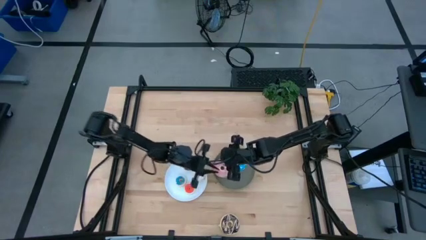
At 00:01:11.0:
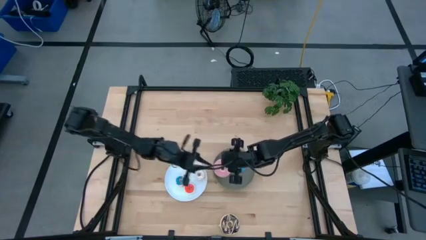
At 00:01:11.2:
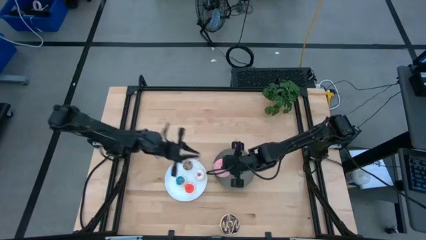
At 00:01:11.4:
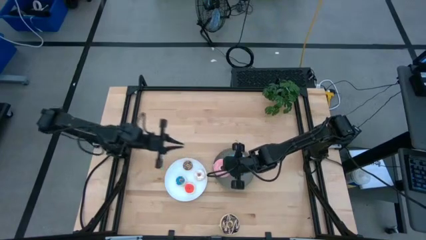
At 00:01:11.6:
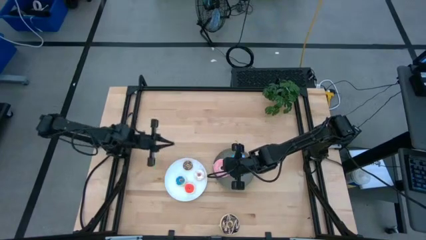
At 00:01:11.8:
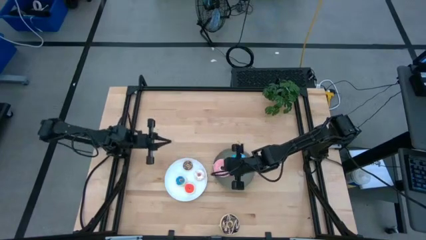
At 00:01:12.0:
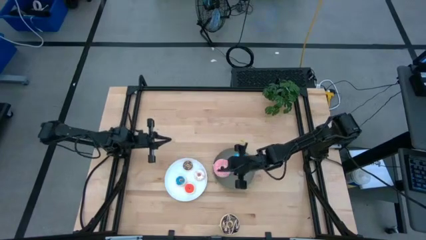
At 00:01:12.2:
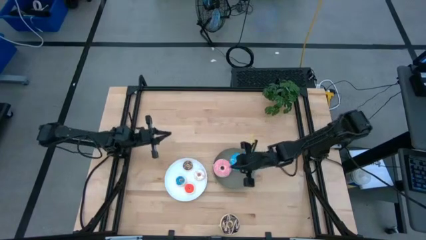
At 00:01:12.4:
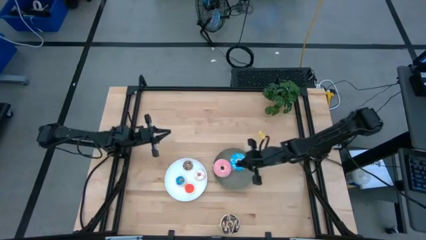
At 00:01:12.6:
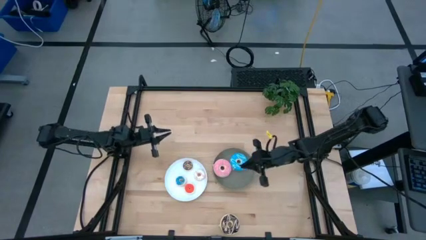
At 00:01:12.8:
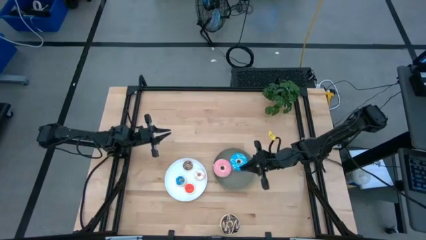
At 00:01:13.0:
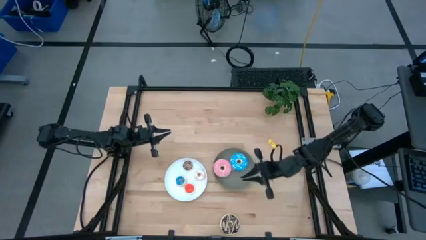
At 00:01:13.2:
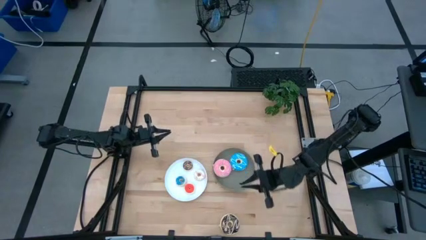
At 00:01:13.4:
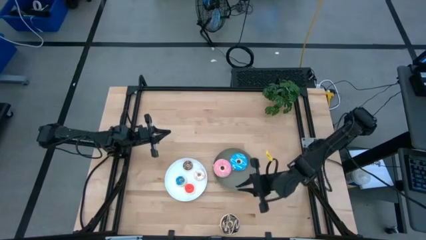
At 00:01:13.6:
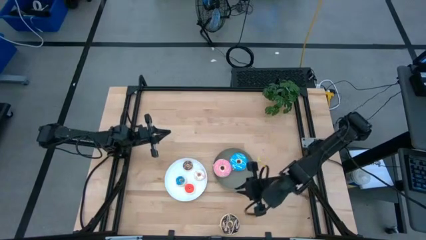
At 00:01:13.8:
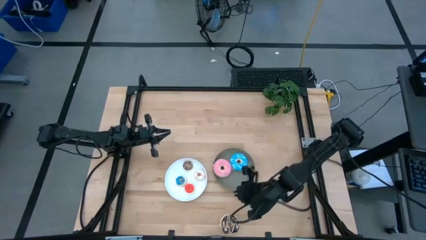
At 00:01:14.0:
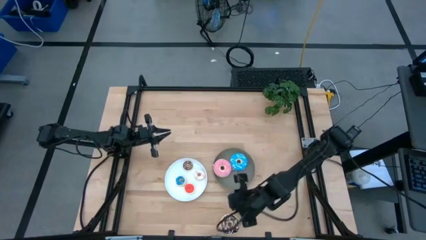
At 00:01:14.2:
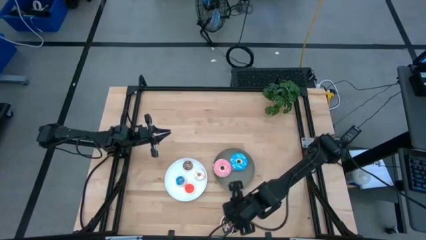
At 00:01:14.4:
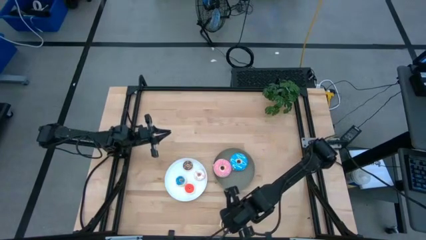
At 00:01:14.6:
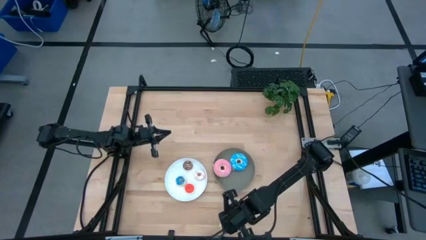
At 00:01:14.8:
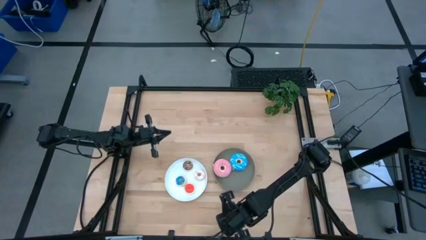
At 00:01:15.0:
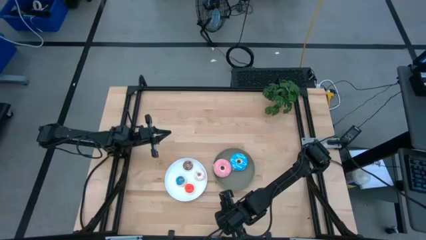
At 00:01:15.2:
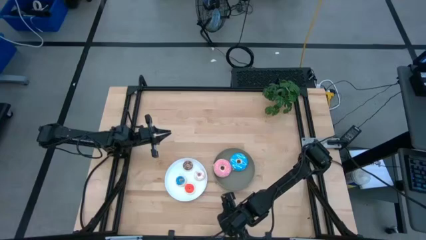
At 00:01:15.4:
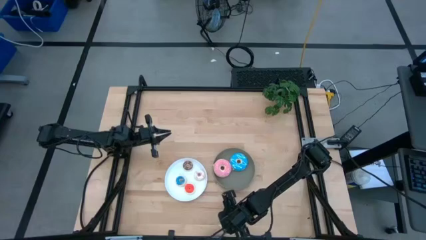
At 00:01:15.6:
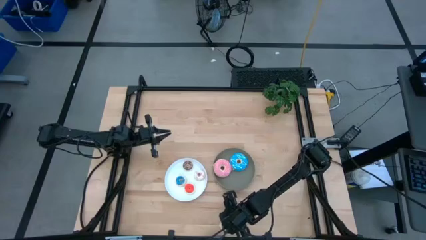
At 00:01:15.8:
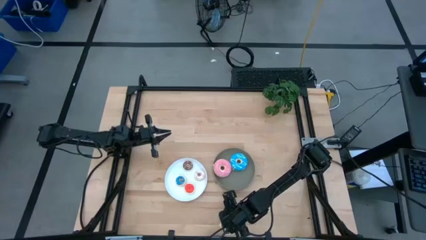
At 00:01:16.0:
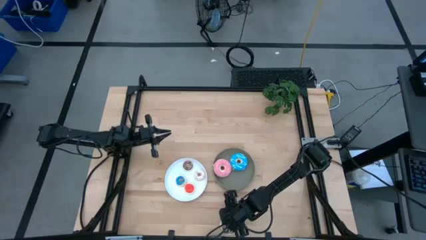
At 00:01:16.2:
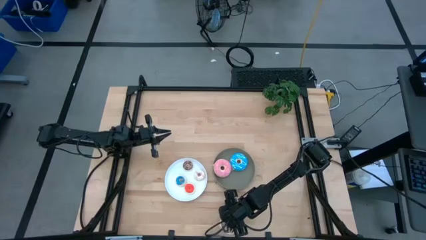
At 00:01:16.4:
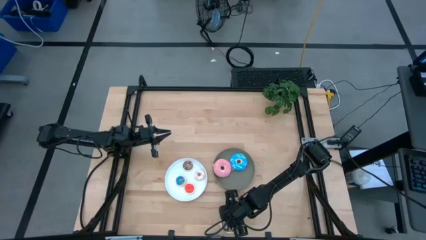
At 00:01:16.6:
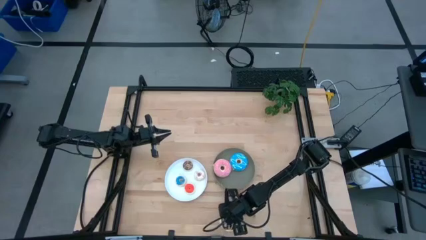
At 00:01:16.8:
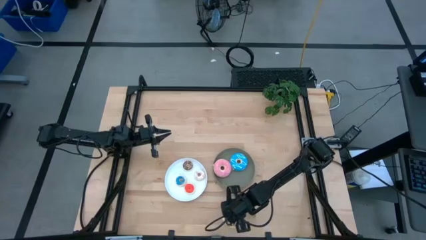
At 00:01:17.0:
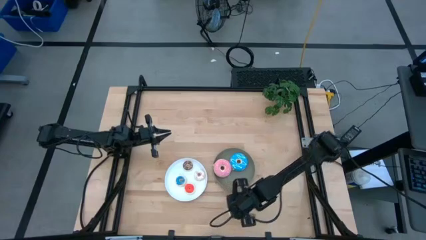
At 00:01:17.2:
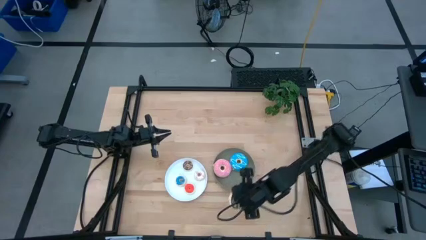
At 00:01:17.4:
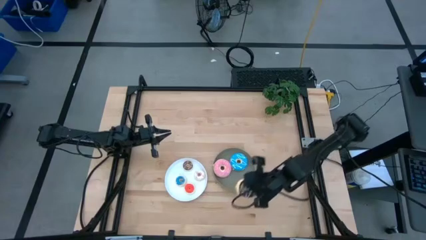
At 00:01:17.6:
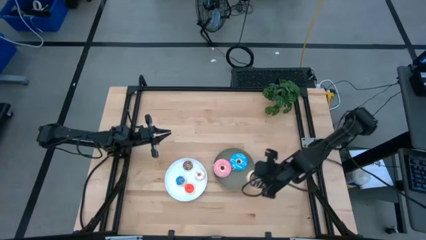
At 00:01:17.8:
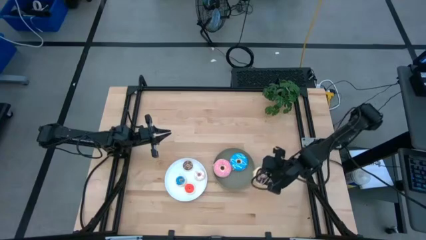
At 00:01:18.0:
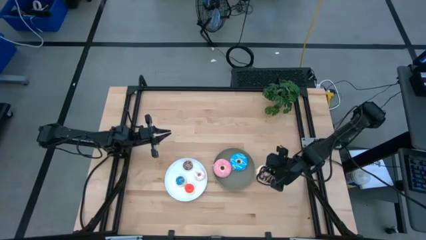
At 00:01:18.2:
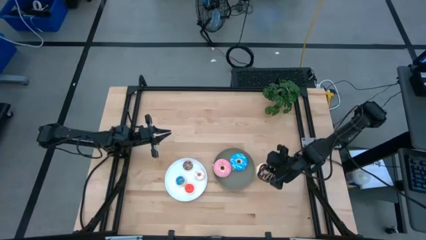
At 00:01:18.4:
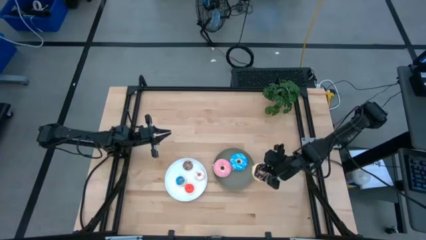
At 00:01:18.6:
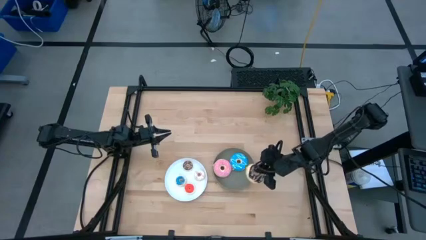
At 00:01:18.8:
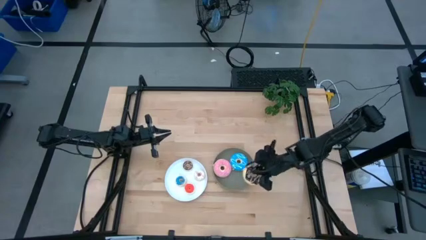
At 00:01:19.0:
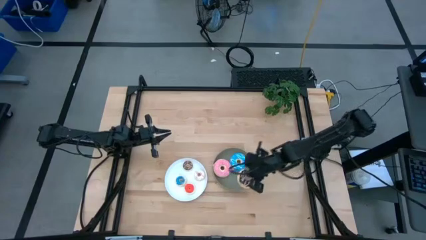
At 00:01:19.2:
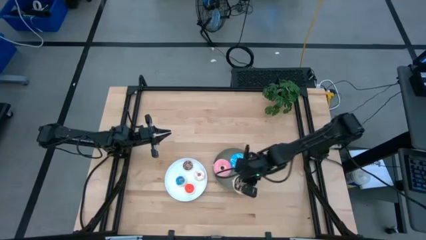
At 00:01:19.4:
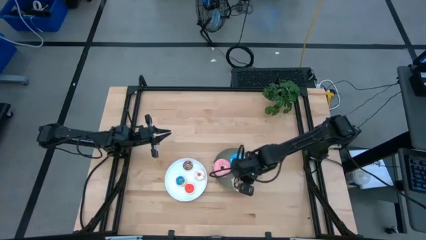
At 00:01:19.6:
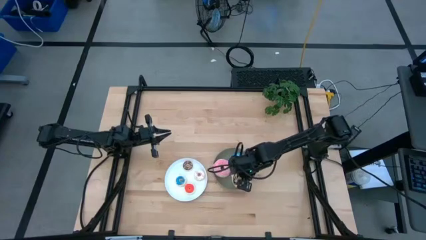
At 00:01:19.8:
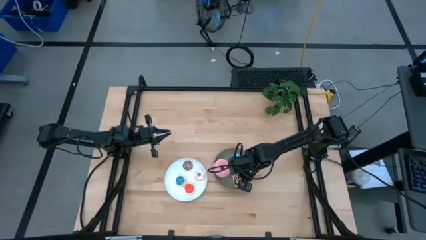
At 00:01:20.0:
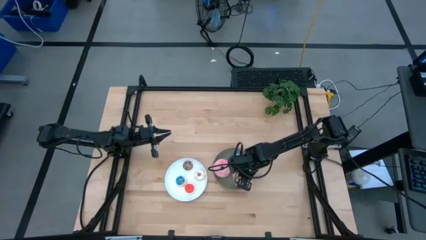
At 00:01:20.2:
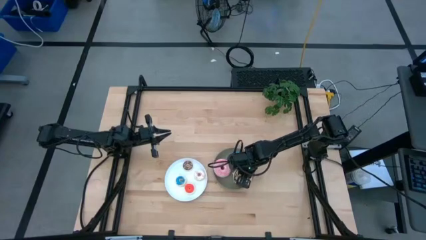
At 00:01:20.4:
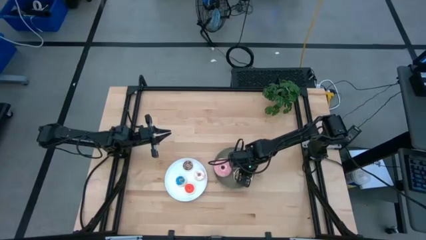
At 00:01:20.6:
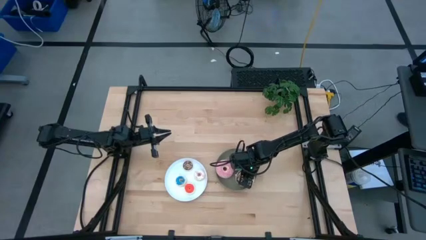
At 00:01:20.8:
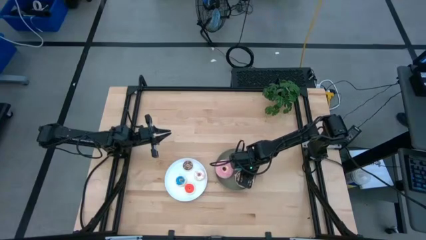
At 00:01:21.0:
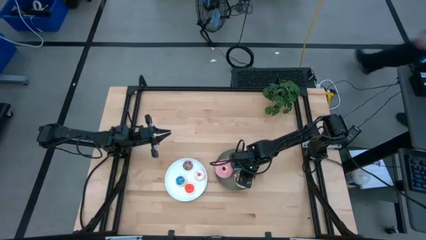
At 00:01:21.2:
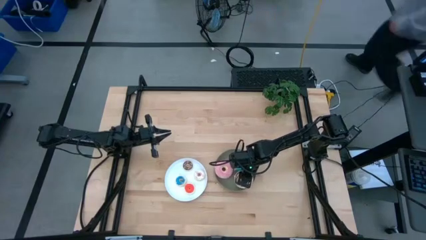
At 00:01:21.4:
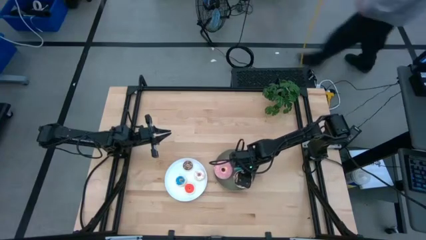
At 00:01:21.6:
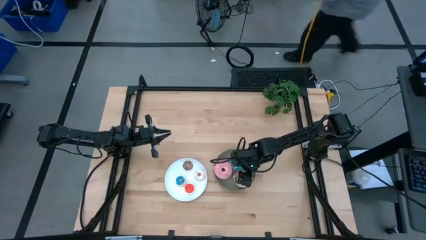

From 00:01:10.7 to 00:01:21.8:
Task: Pick & Place donuts
Put the large black donut on the gray plate

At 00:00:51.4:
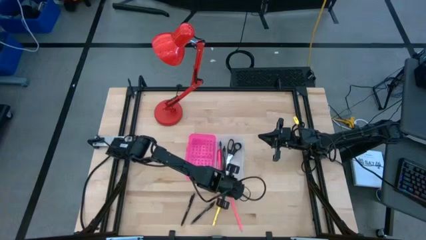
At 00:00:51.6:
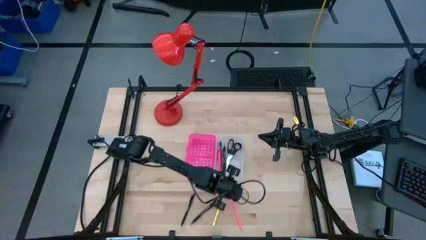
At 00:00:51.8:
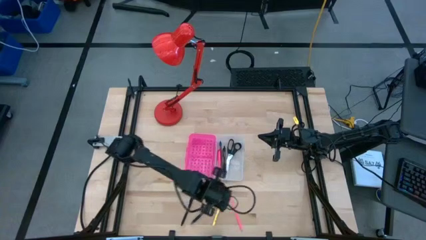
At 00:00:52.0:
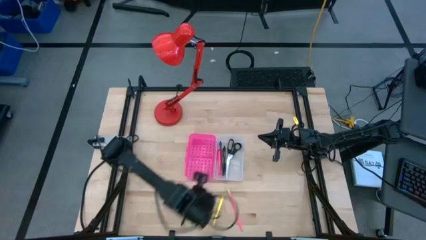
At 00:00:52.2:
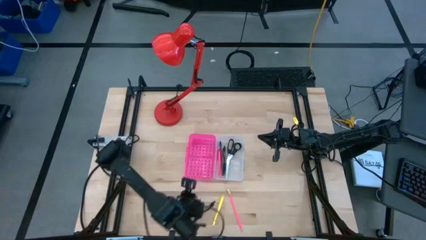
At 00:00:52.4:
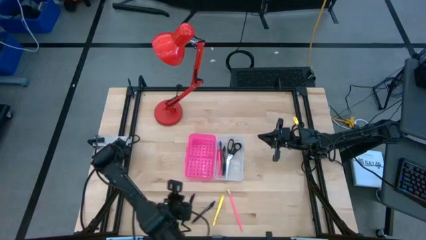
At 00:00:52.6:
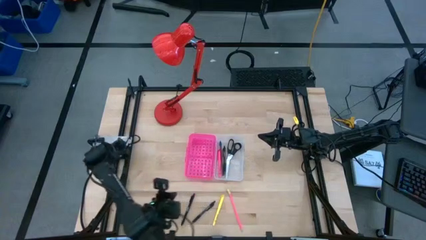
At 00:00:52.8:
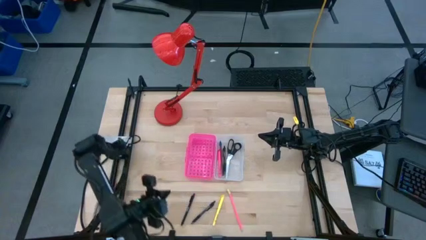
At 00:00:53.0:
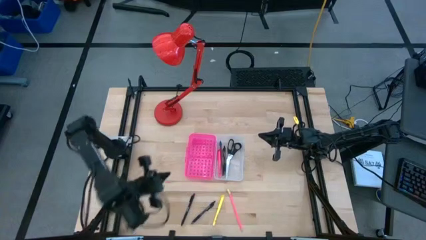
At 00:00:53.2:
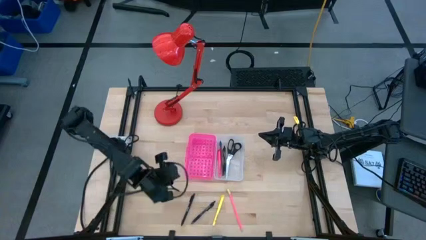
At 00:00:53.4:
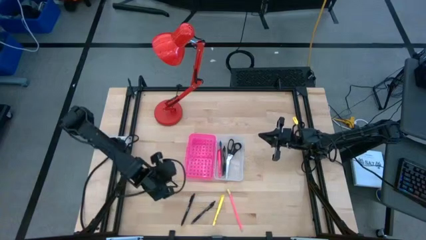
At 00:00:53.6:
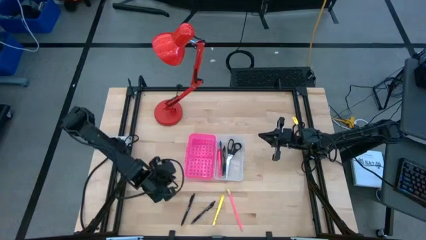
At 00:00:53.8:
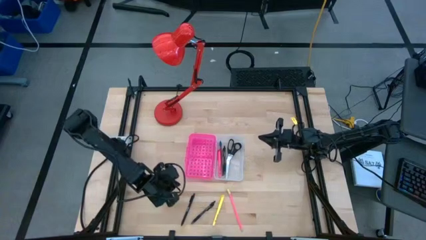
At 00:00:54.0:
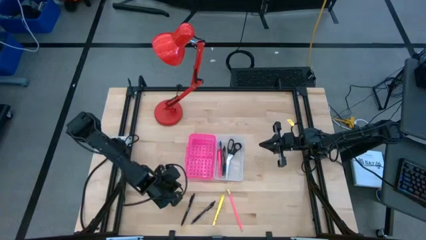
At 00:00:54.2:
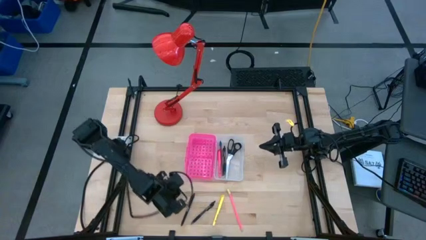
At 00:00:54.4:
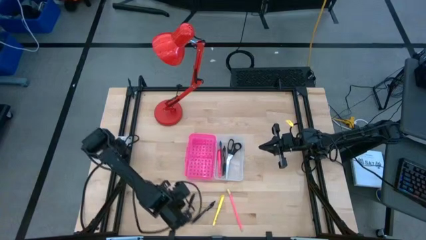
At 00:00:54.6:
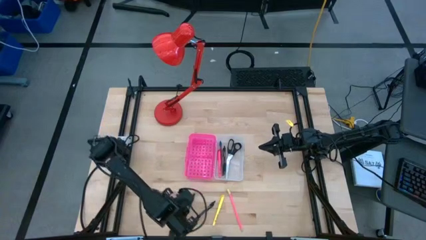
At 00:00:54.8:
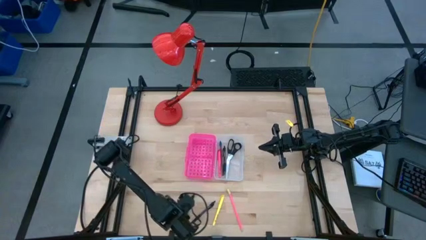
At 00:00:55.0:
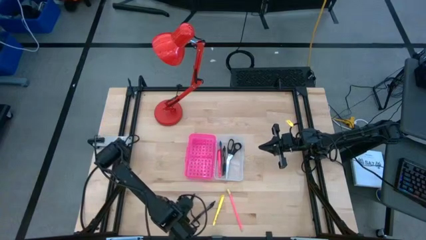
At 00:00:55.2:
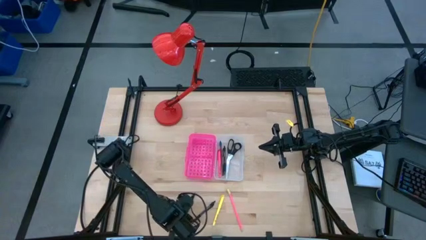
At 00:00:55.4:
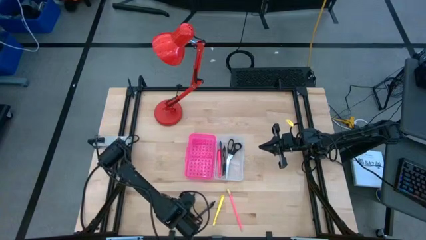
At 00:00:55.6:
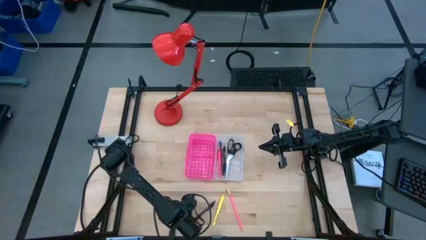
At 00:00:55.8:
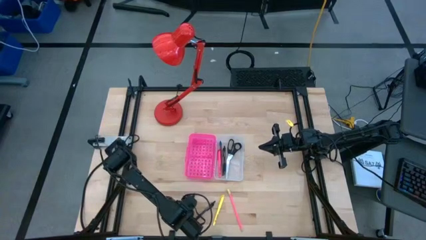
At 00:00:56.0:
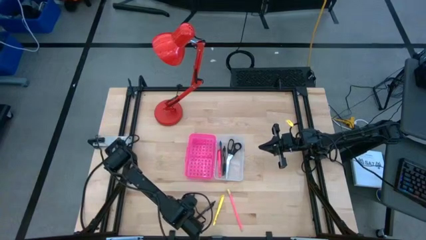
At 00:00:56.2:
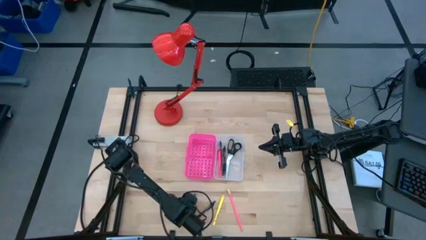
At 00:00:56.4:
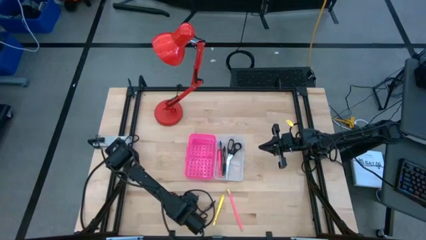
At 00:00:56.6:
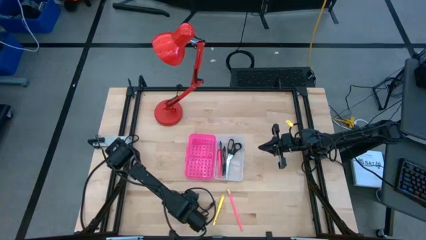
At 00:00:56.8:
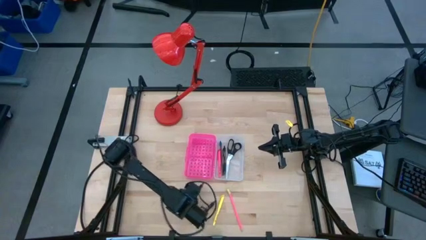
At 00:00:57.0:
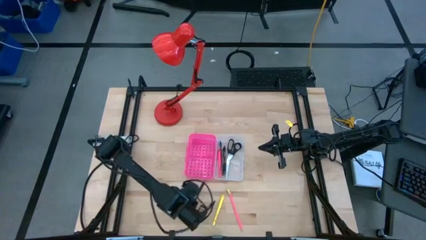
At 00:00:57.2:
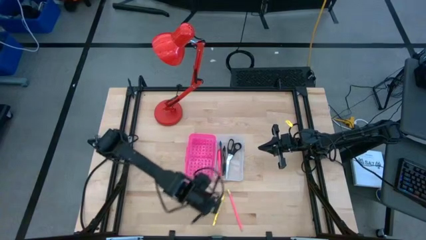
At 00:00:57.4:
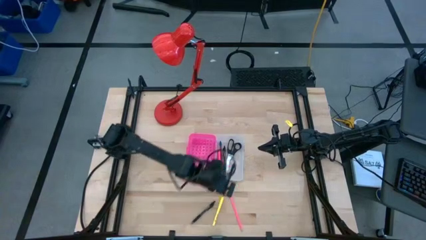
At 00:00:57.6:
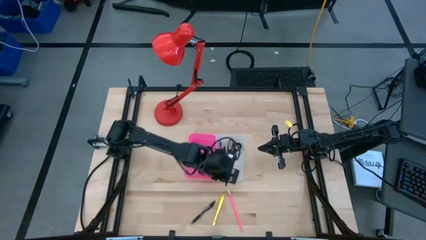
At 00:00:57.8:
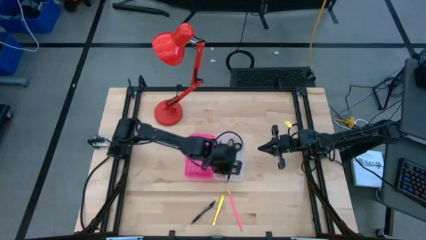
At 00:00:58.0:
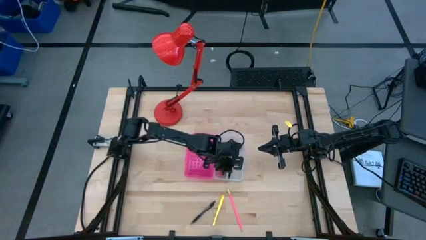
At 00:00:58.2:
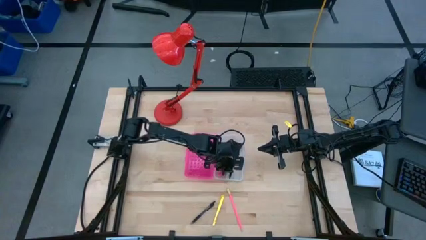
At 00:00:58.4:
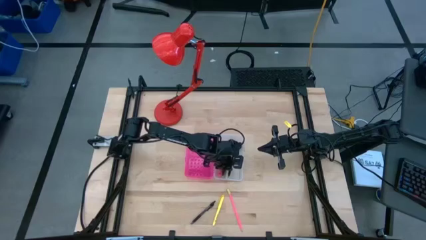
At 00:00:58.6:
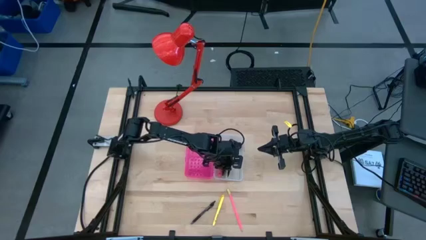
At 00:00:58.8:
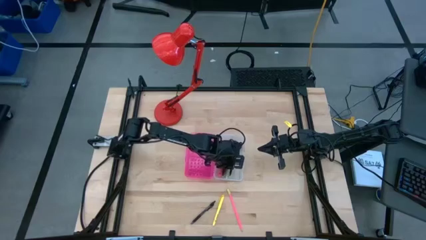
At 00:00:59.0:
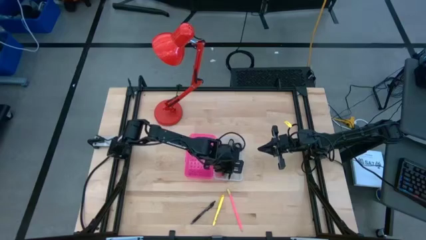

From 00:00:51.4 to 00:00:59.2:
Task: Pick & place school supplies into a supply box
Put the left black pen in the pink box
